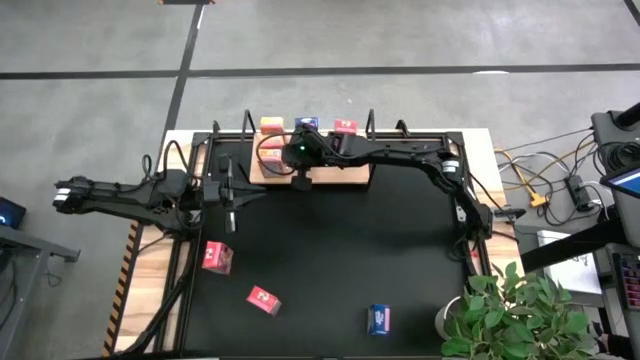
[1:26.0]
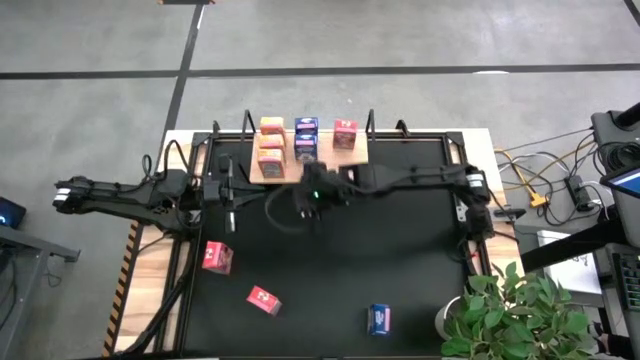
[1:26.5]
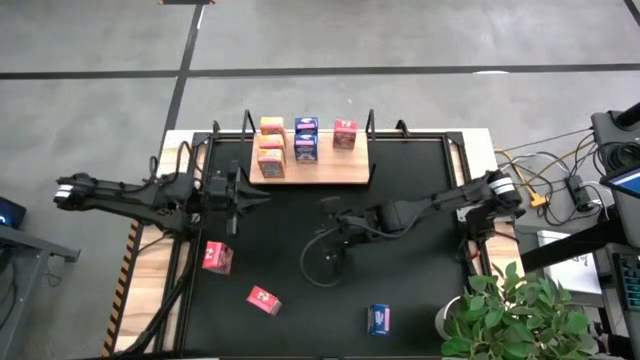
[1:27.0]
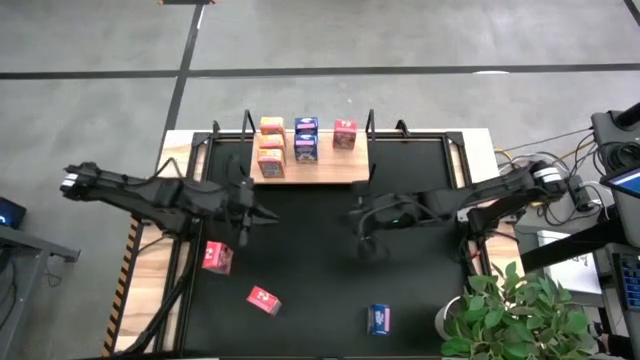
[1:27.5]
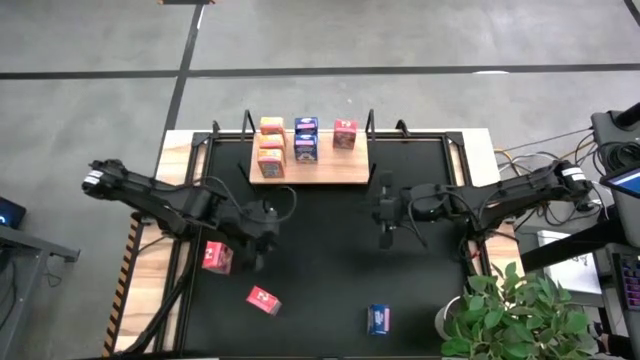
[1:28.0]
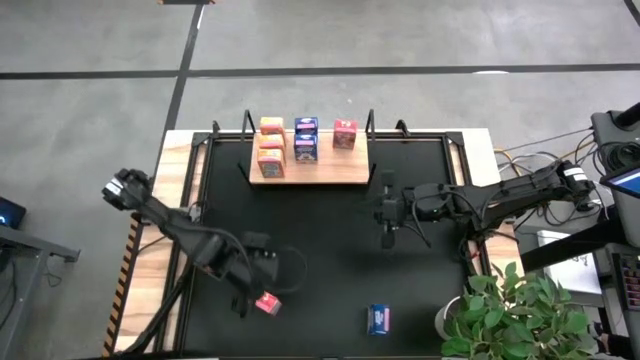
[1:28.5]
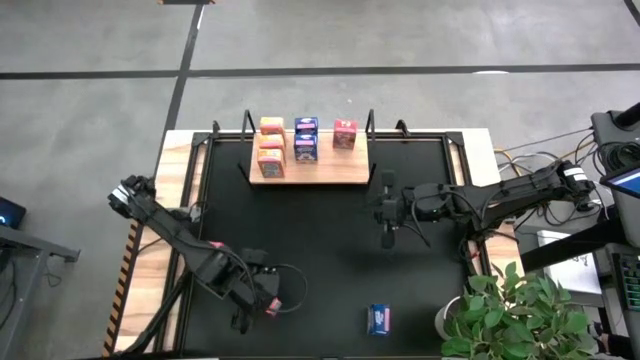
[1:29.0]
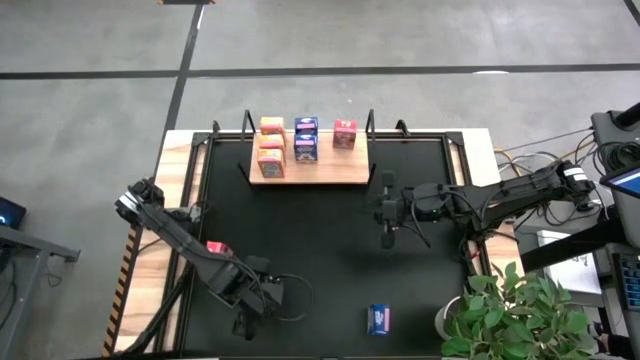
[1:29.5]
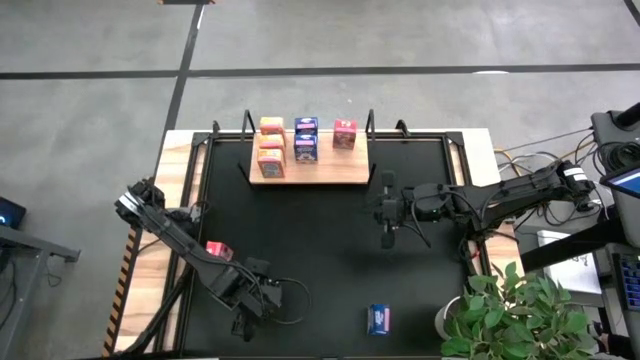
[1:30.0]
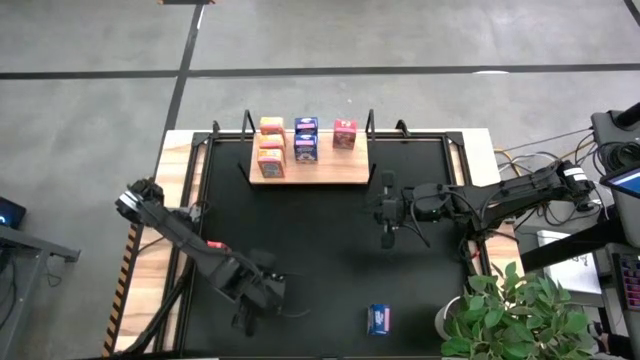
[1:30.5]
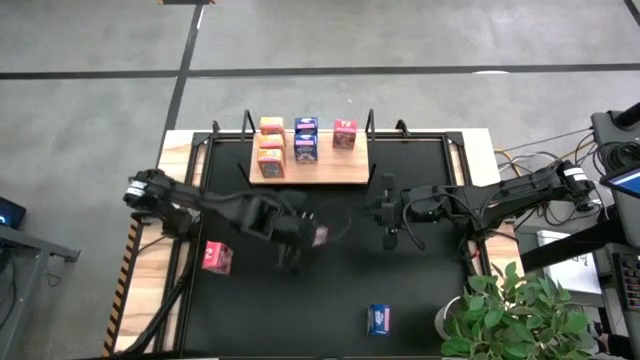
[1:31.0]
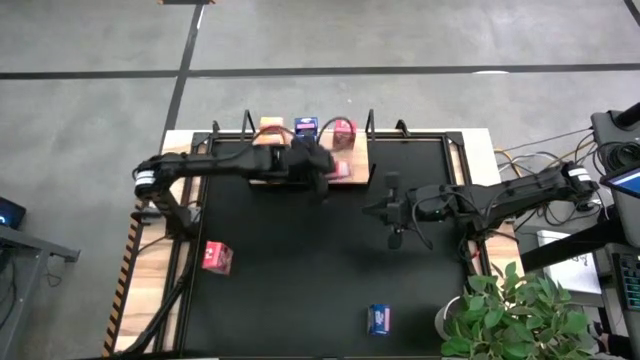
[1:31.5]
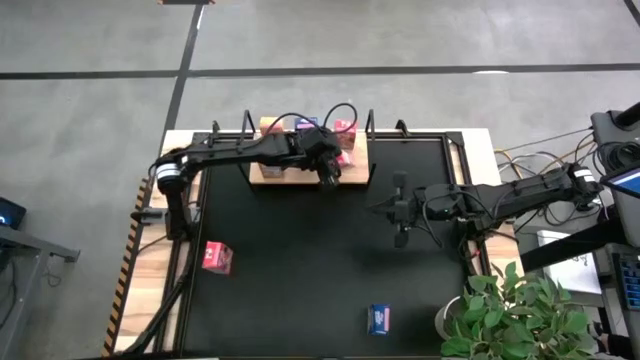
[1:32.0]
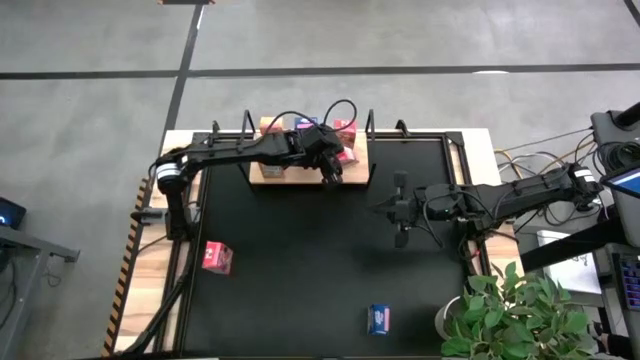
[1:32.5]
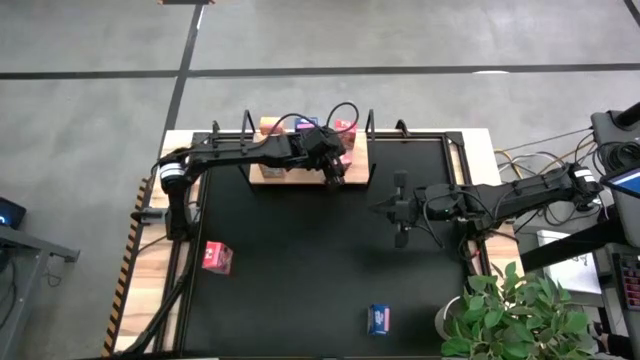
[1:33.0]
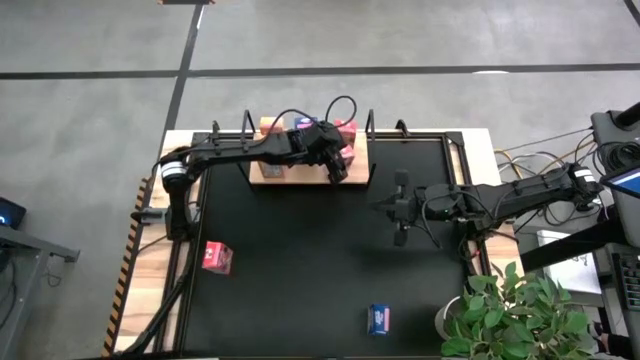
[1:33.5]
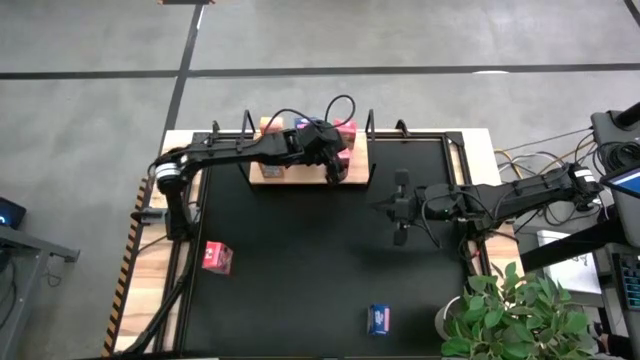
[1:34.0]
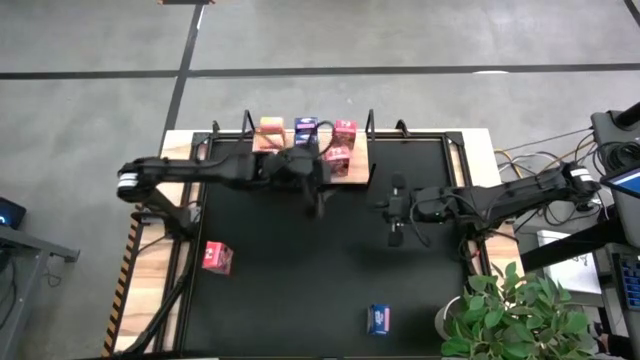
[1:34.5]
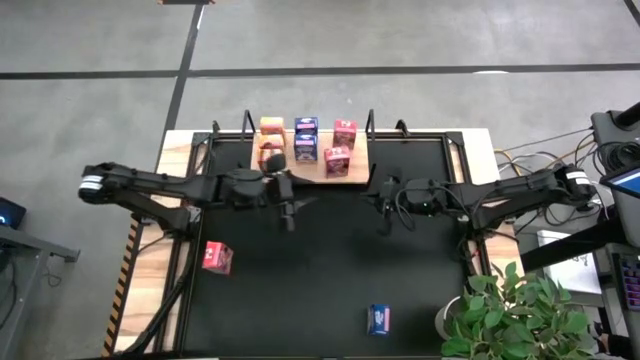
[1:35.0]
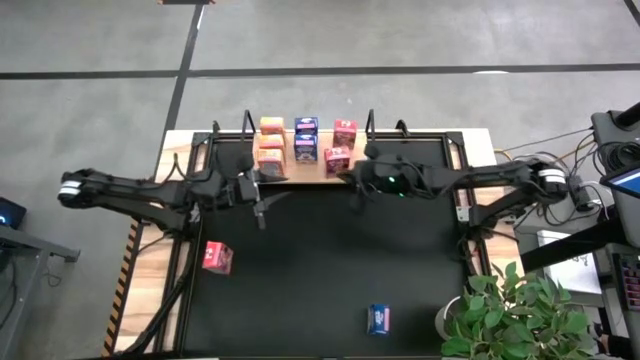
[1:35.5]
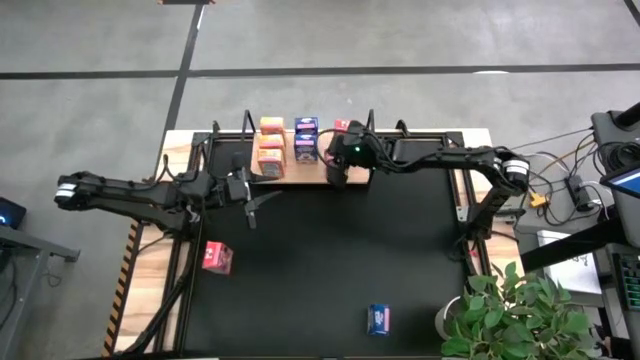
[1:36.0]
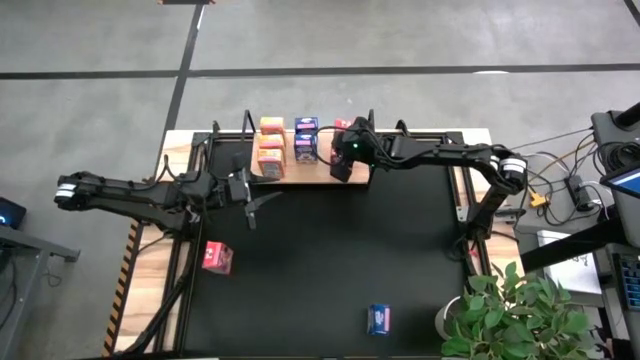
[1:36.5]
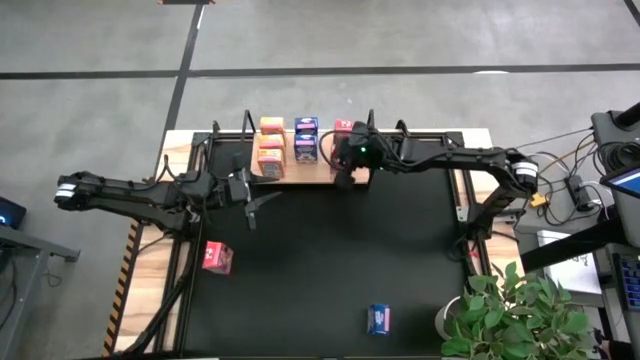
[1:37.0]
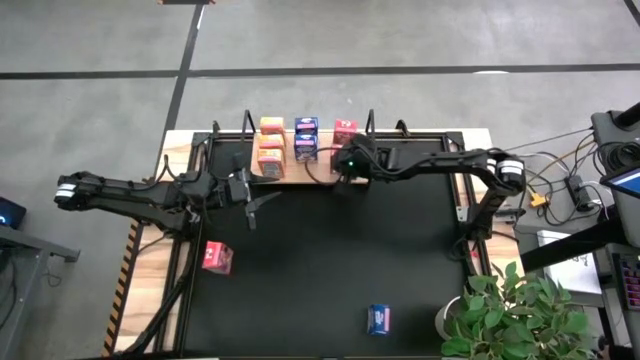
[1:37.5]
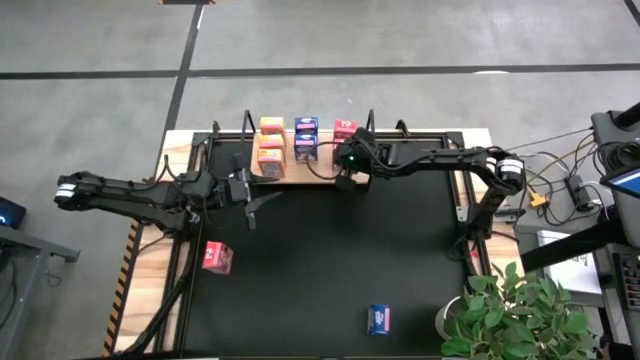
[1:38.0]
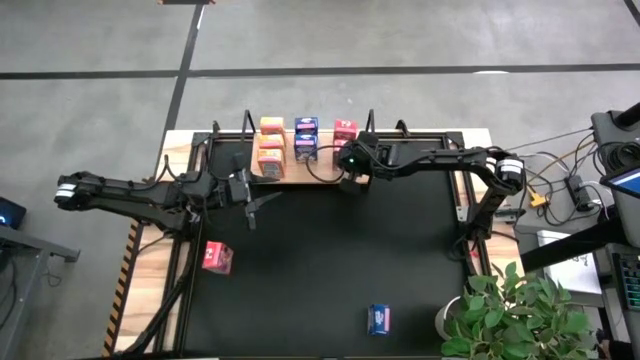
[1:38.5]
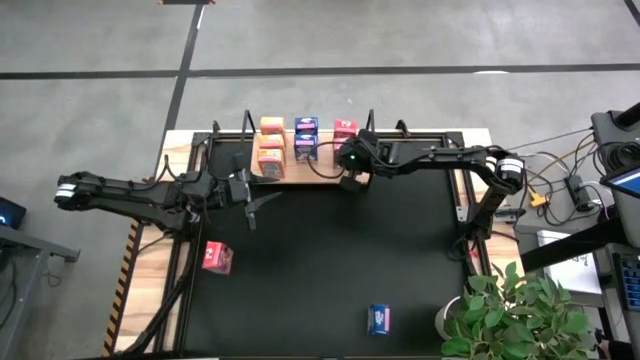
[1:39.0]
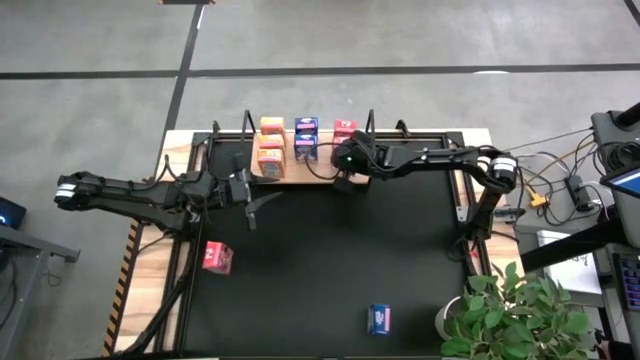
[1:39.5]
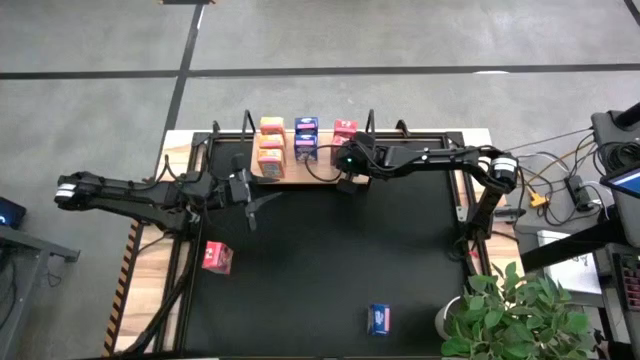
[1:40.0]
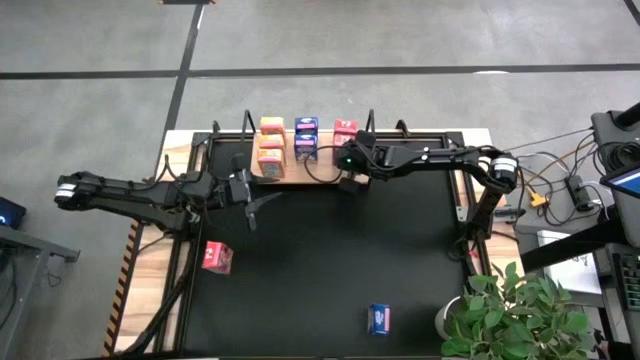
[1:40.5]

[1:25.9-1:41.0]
Task: Stack cereal on shelf
Put the bottom red cereal box on the shelf aligned with other red cereal box

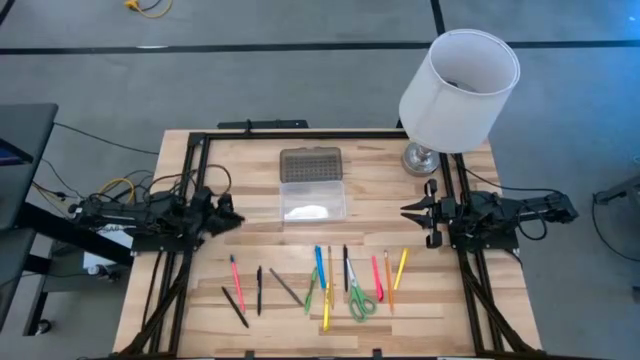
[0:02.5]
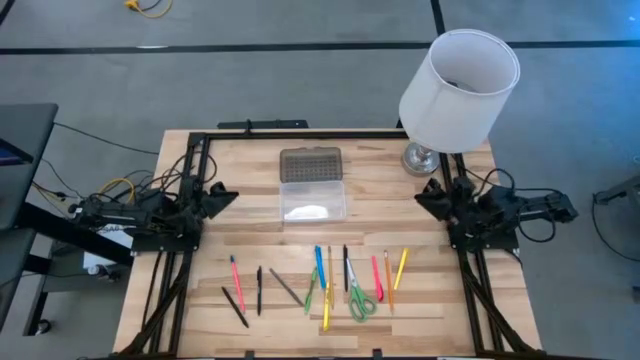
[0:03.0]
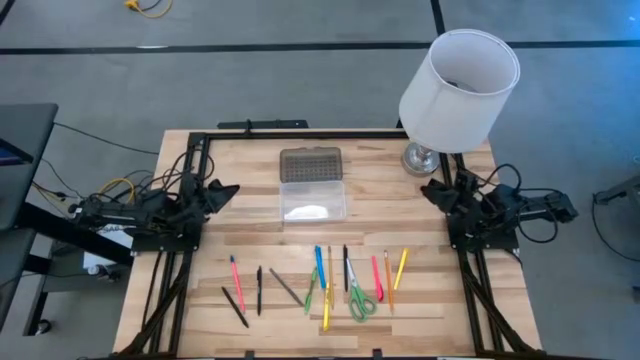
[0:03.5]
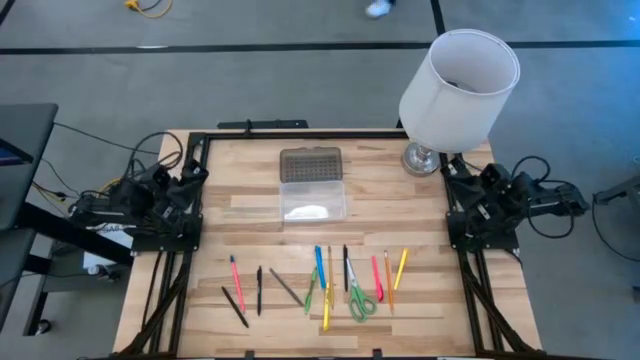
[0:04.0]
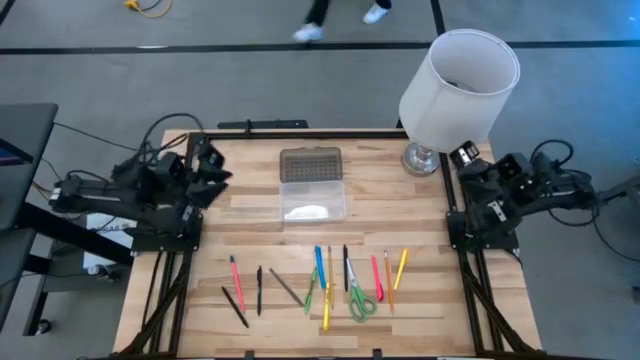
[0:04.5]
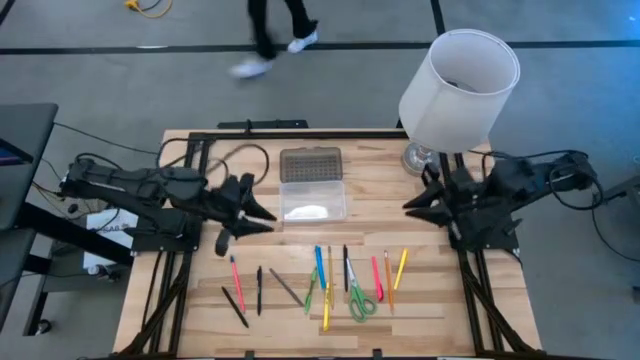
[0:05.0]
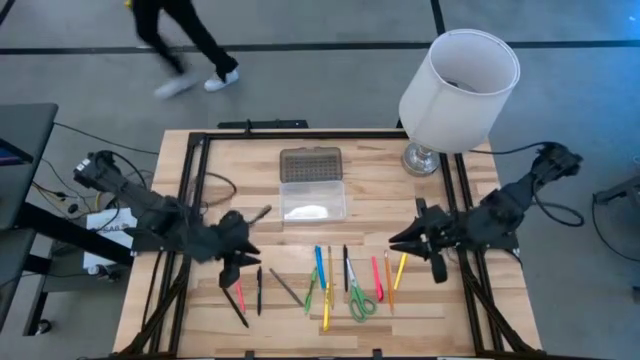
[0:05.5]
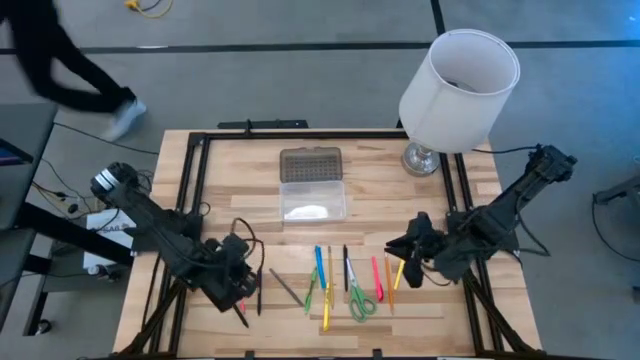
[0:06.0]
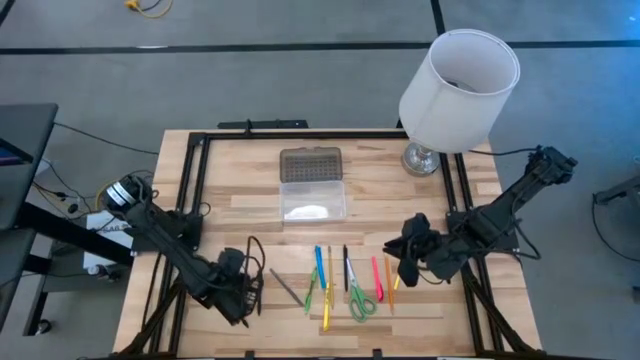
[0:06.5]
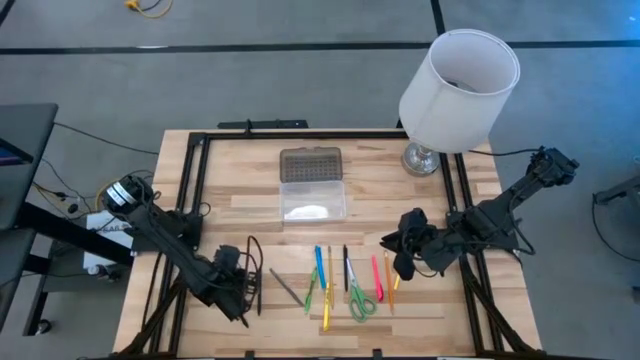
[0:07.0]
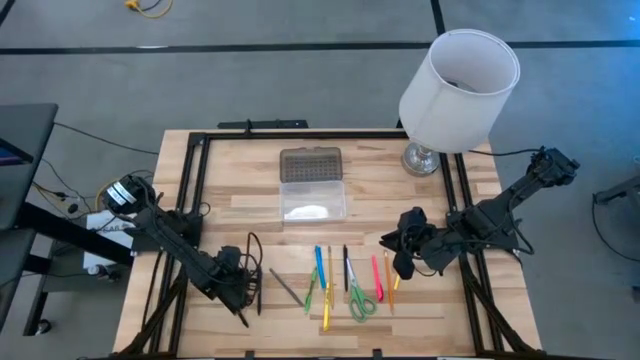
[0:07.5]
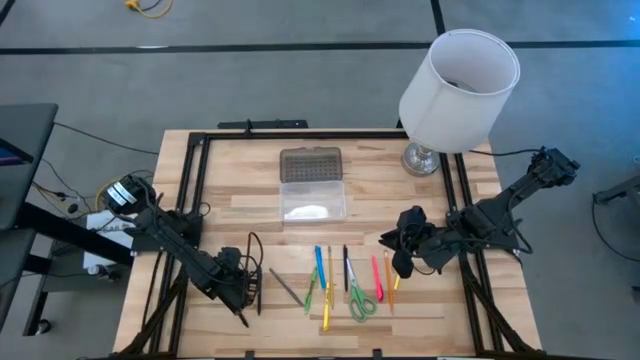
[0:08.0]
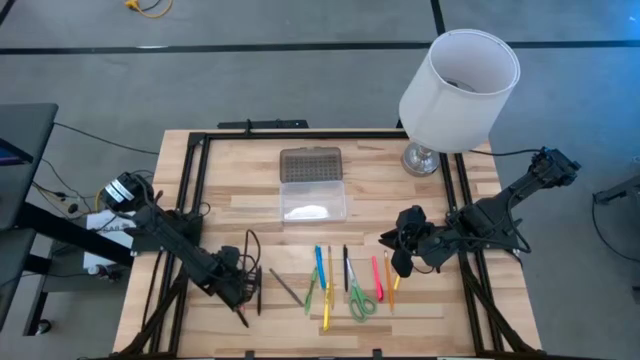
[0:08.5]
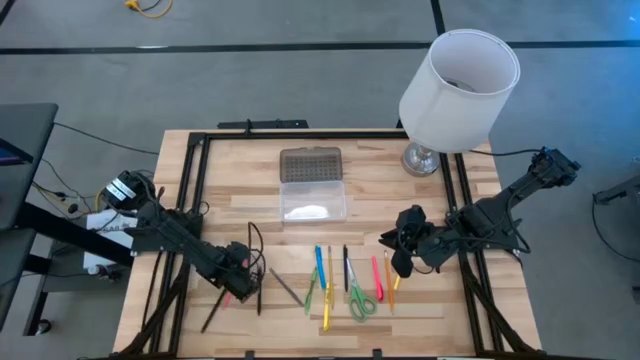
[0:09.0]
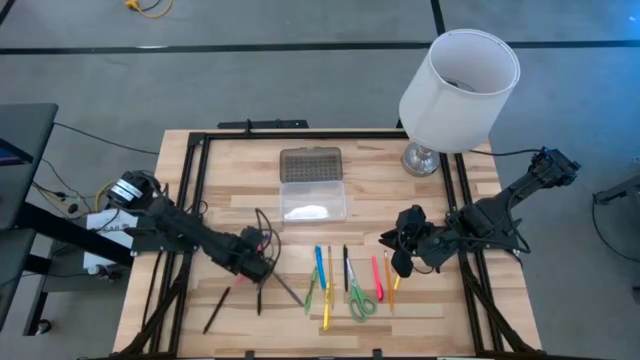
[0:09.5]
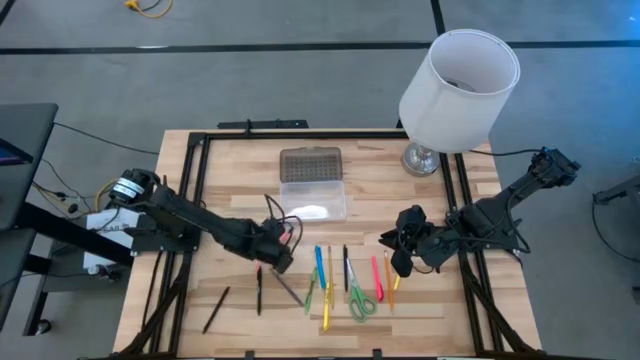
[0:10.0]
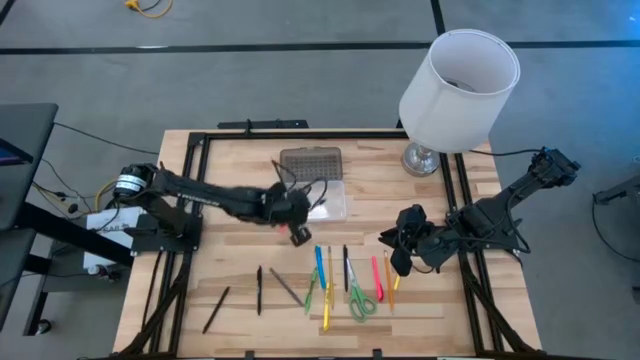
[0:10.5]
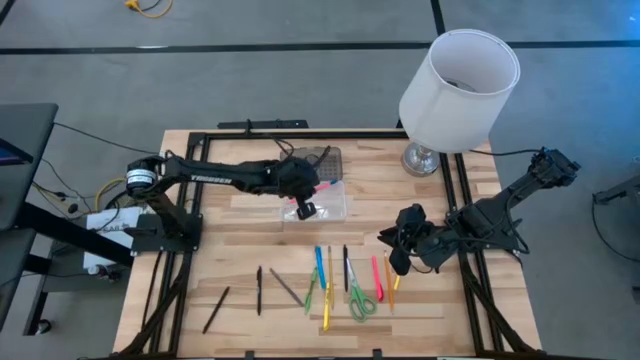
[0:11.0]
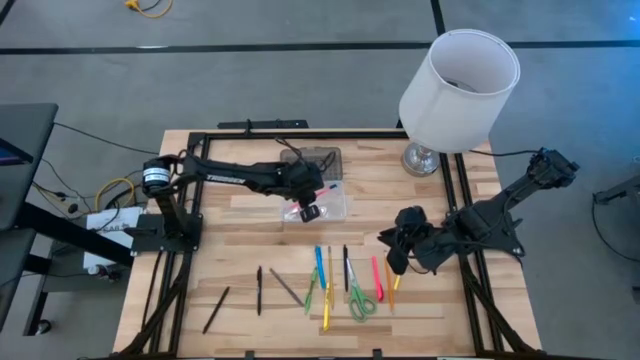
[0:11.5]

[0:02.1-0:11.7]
Task: Pick & place school supplies into a supply box
Put the pink pencil into the supply box
